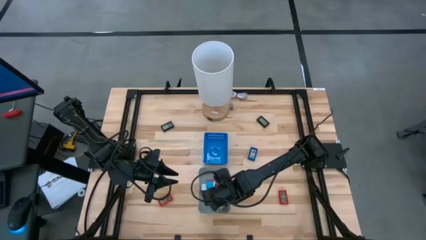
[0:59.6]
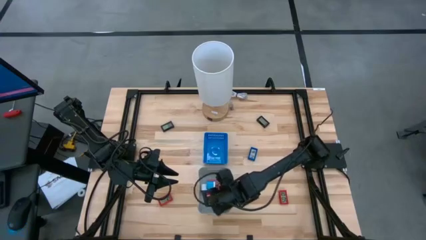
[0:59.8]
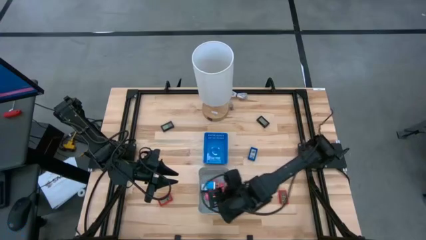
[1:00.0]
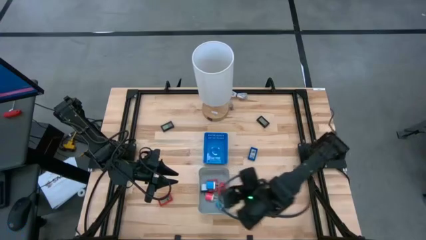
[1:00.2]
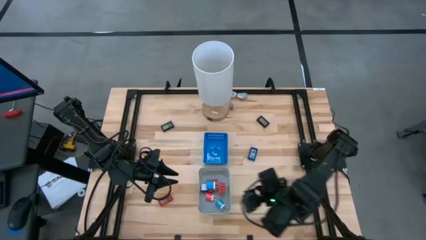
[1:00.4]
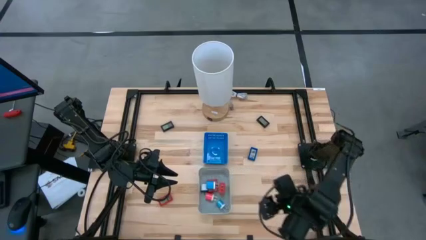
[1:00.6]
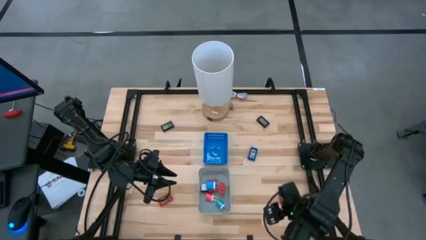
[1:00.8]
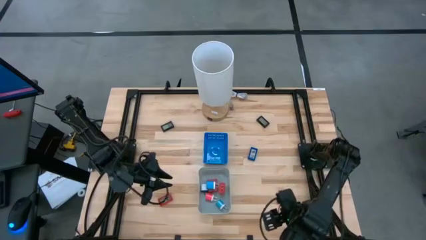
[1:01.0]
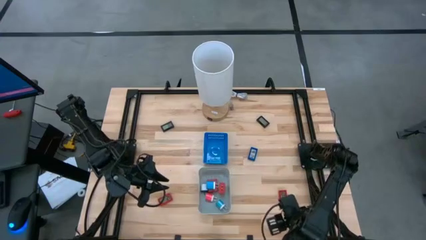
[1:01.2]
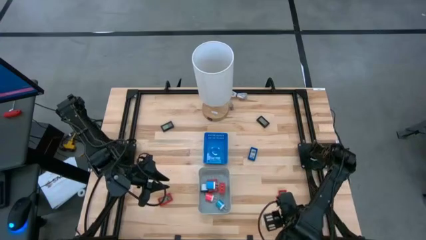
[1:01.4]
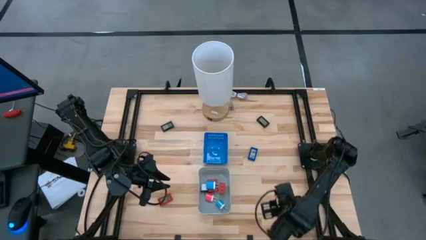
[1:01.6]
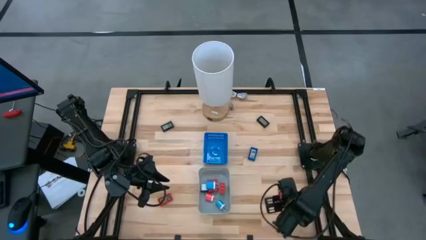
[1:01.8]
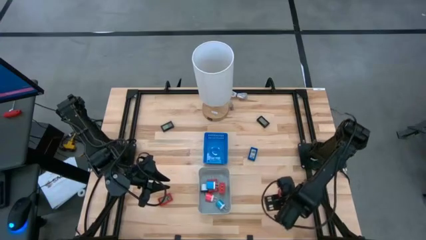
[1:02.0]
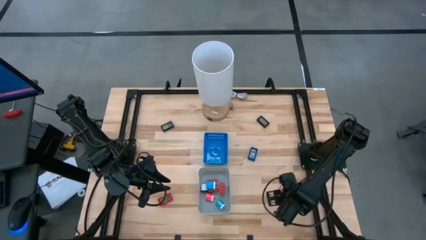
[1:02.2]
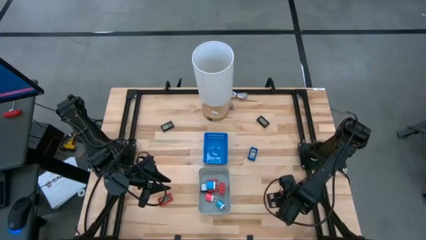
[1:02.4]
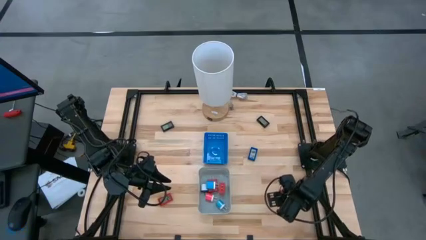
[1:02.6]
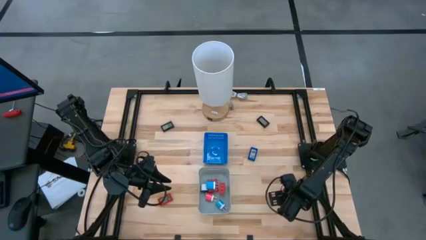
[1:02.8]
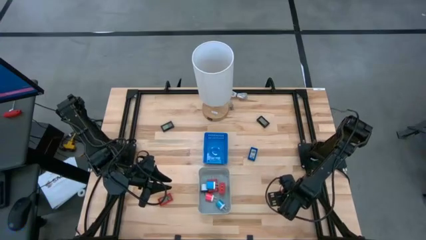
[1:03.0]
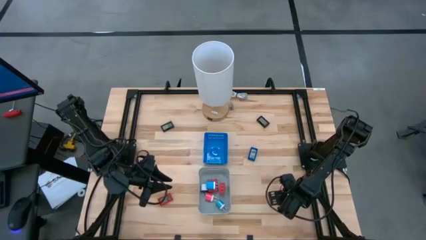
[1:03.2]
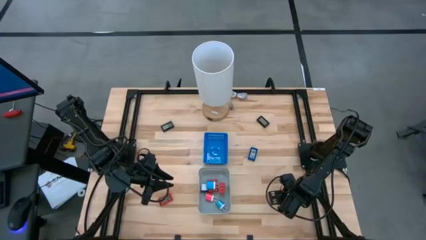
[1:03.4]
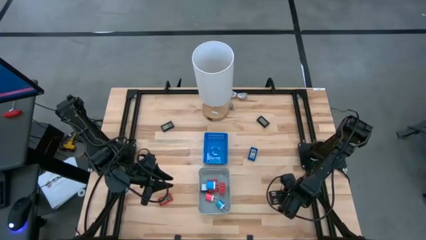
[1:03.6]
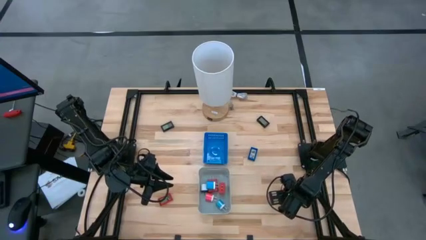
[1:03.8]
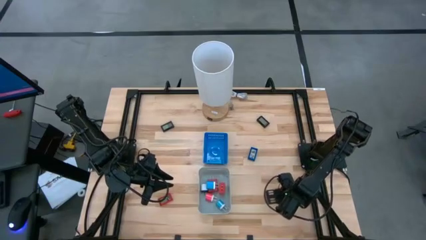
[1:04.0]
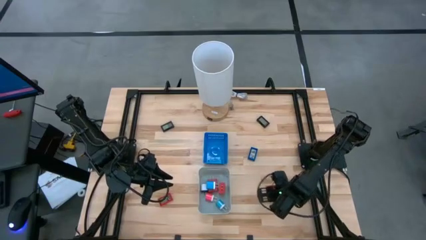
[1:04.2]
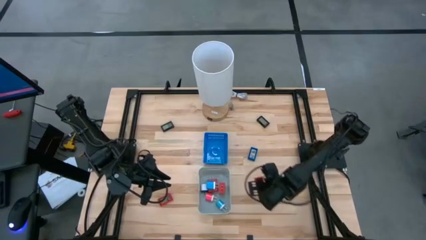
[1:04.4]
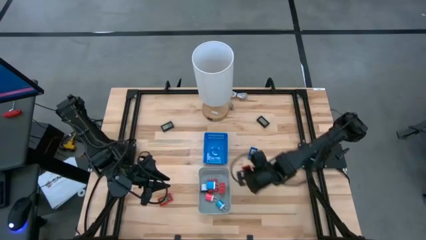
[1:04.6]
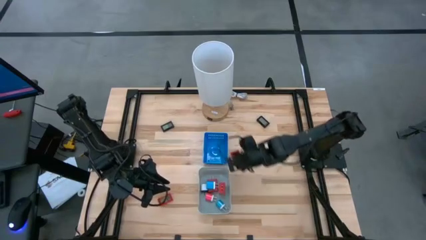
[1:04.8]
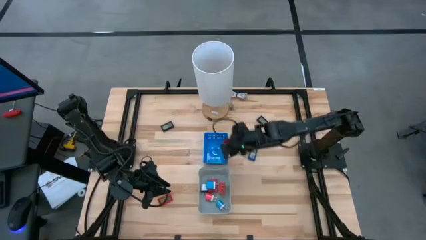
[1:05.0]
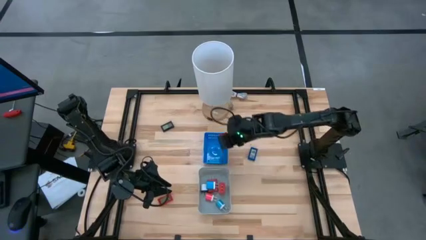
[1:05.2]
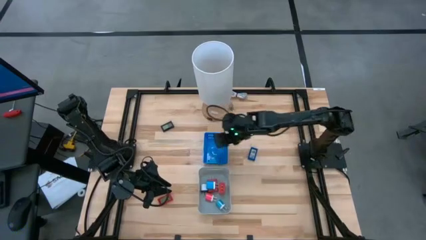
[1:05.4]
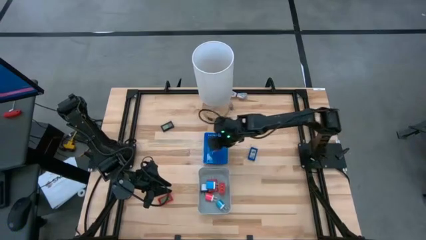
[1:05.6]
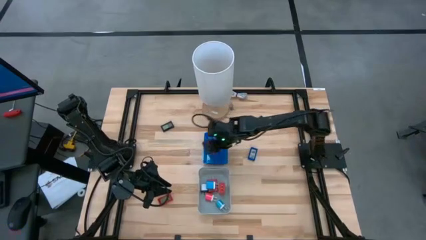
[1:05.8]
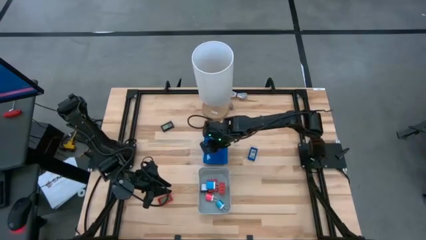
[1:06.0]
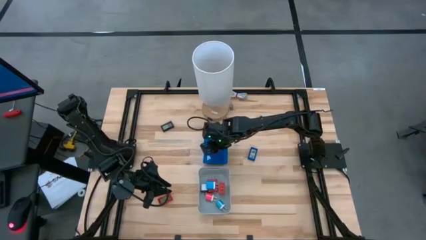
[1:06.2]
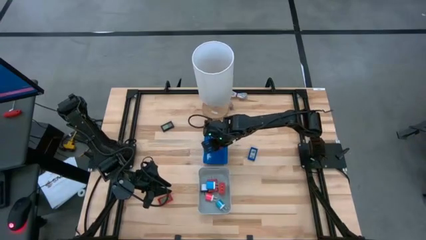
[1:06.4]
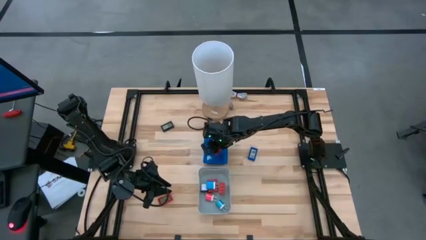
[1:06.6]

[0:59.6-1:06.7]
Task: Pick & Place Office items
Put the right red digital clock into the blue bin

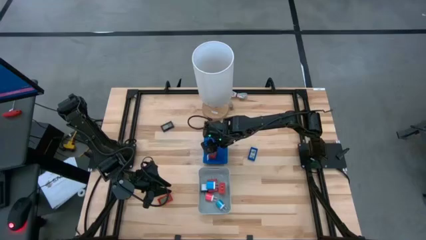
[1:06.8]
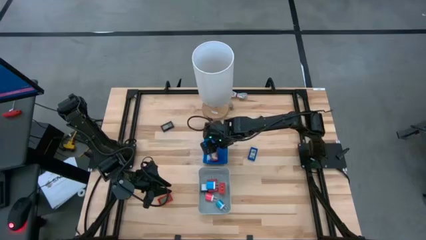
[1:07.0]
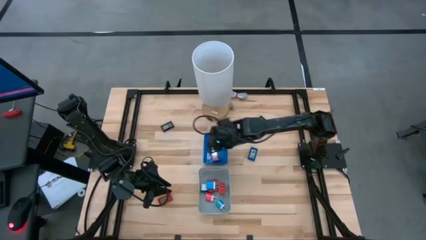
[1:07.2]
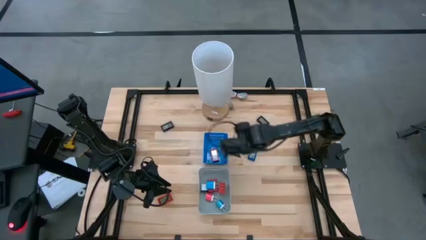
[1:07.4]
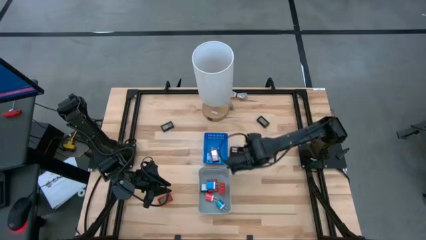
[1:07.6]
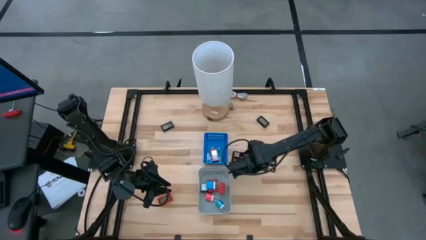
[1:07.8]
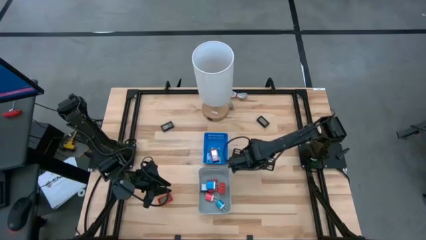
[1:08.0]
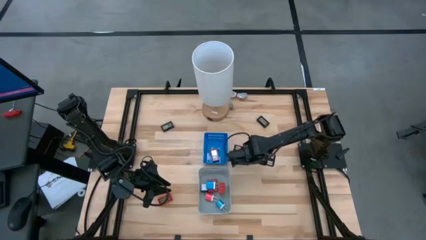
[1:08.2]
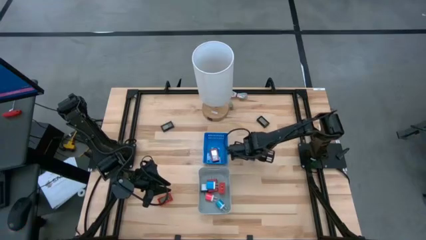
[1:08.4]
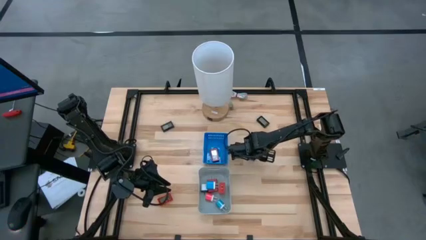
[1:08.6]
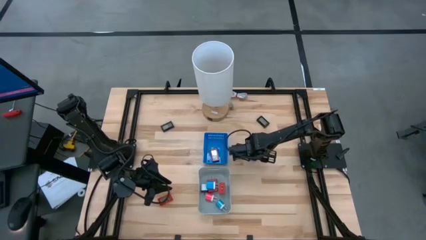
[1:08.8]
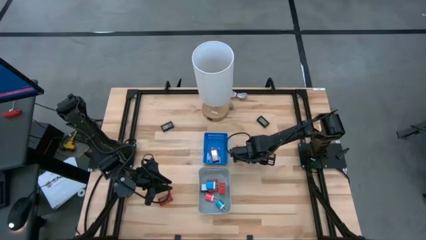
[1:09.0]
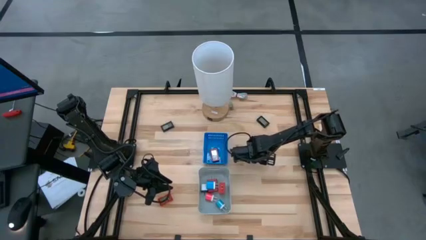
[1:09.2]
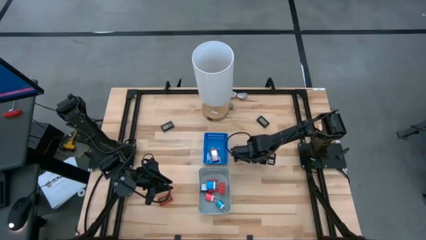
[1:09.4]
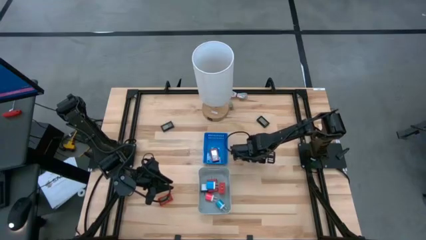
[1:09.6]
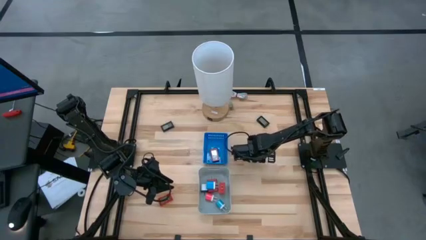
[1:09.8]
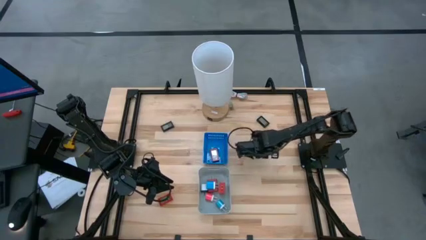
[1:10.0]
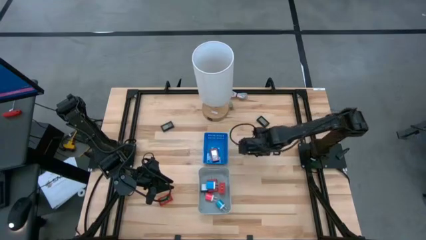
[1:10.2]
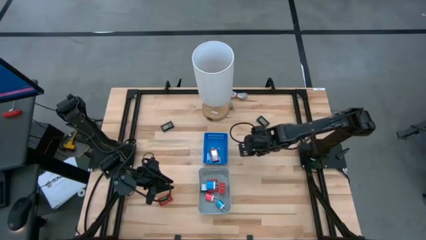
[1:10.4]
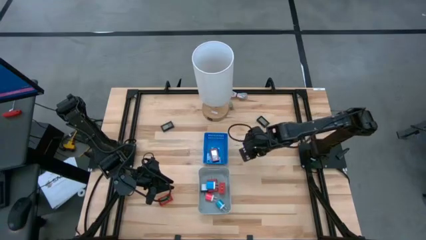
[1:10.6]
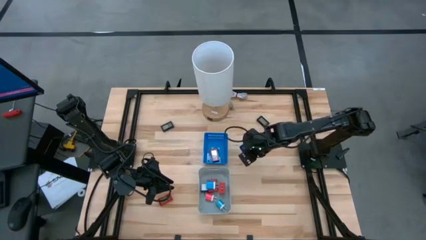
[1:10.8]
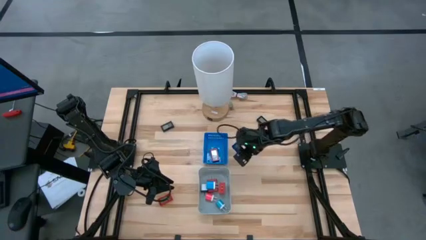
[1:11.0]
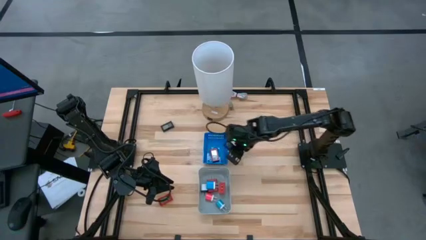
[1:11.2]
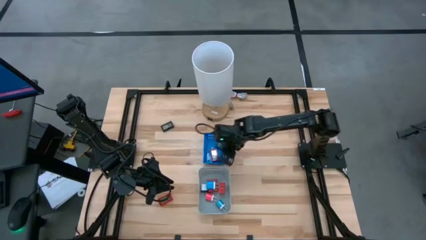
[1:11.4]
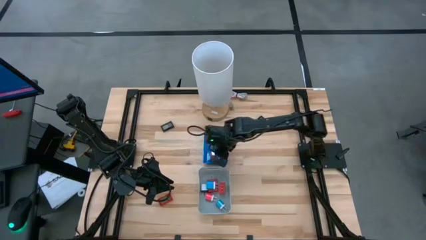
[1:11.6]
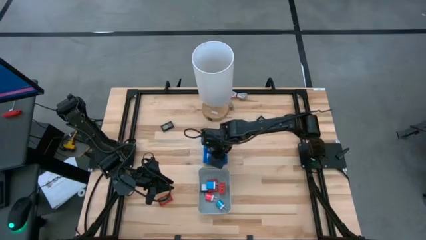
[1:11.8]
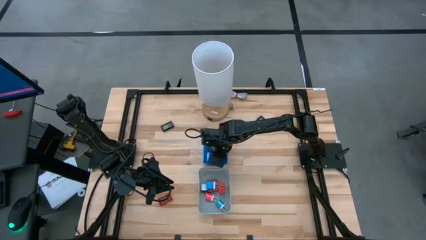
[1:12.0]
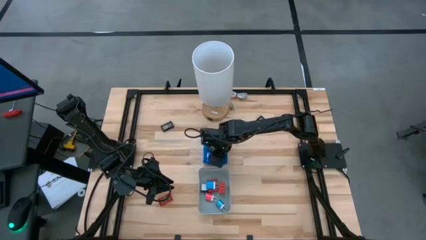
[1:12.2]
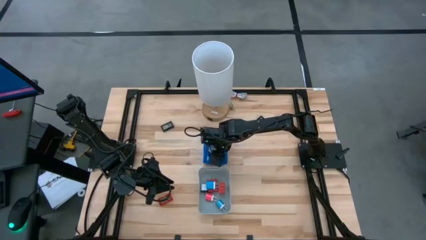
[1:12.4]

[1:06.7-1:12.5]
Put the blue digital clock into the blue bin
